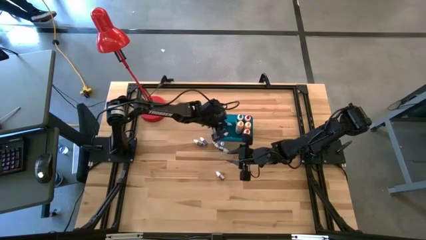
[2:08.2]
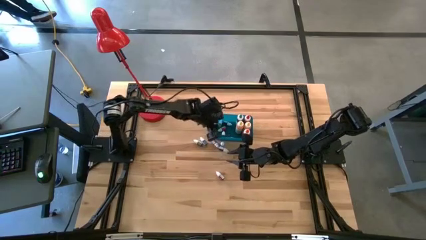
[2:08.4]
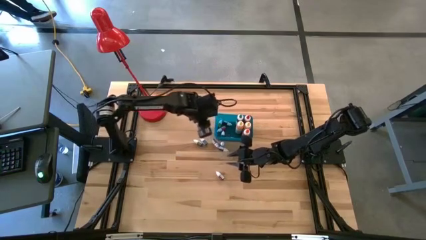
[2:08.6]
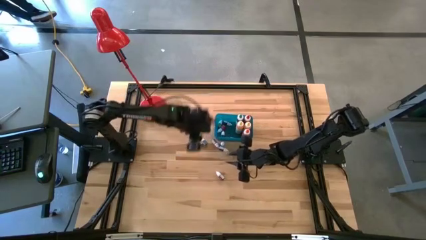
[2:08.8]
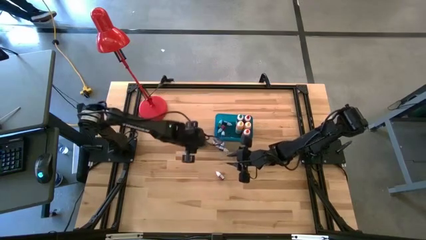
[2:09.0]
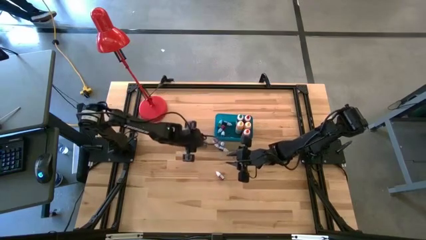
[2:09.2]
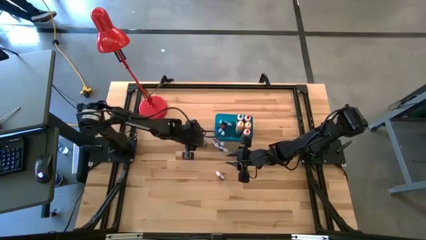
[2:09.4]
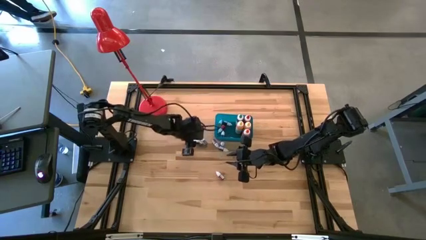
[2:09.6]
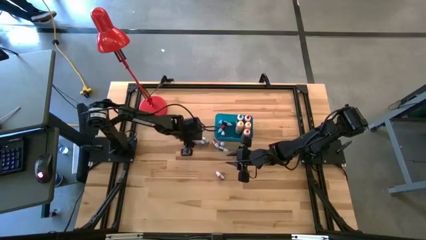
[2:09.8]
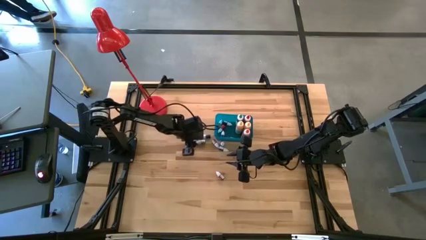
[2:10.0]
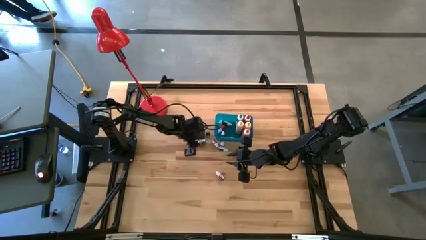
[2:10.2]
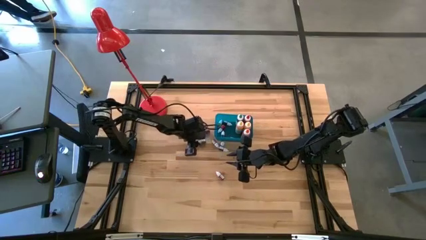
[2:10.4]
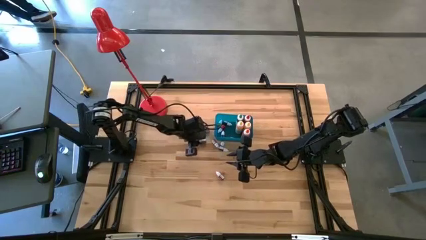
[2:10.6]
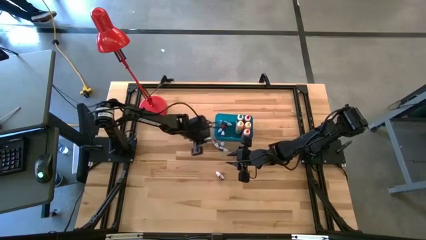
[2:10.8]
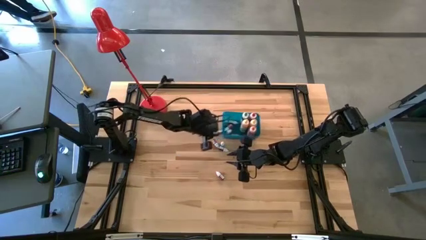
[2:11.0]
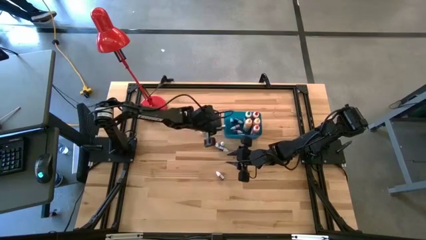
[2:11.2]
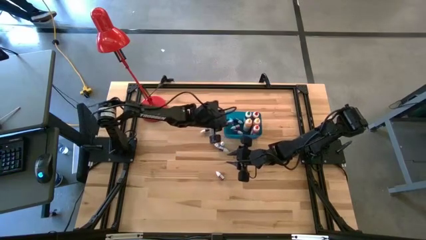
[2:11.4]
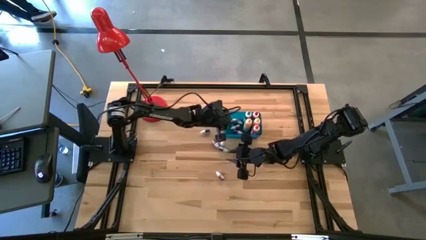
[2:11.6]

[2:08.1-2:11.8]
Task: Pick & Place food coloring
Put the small green food coloring bottle into the blue bin

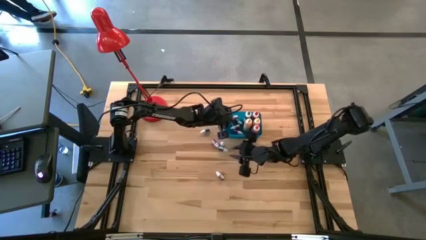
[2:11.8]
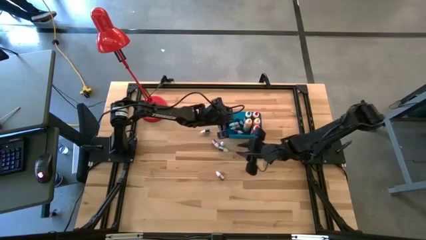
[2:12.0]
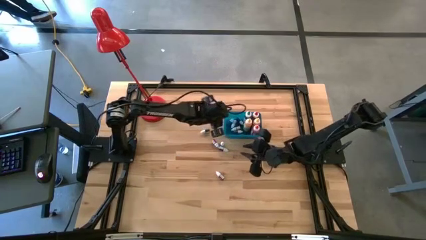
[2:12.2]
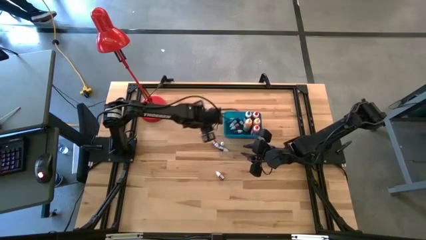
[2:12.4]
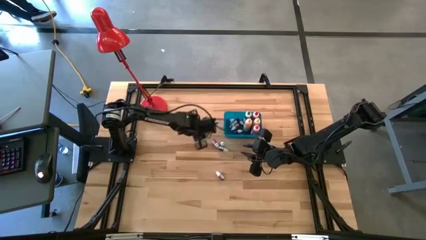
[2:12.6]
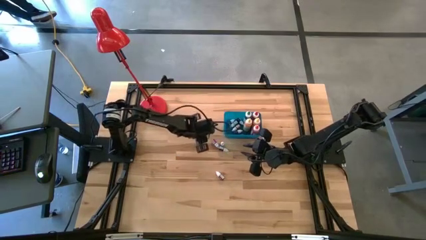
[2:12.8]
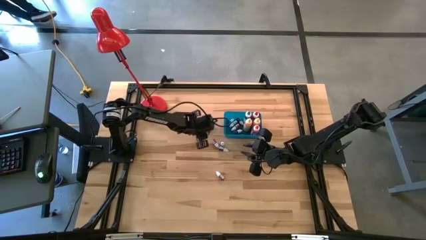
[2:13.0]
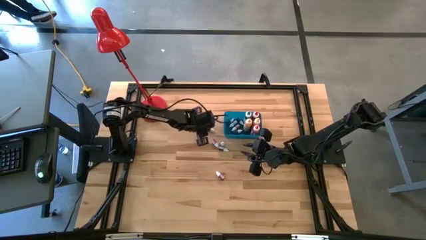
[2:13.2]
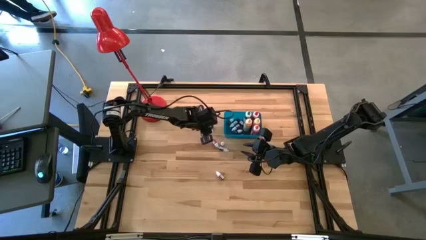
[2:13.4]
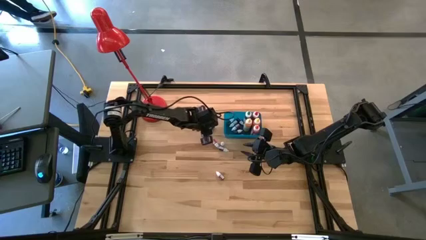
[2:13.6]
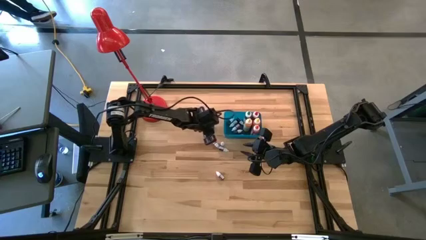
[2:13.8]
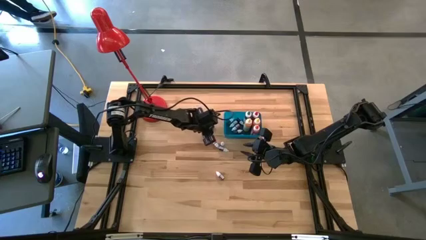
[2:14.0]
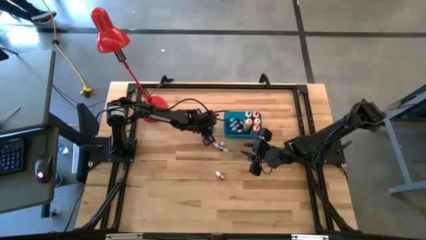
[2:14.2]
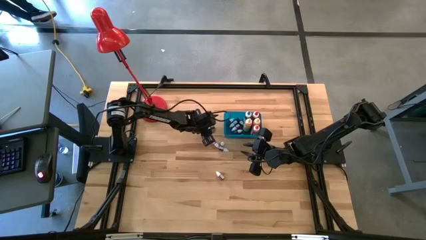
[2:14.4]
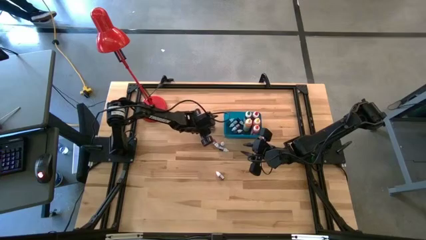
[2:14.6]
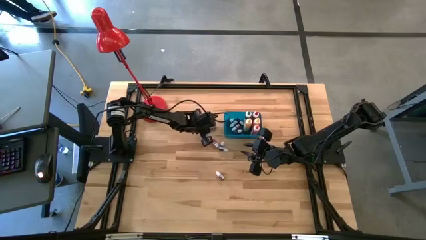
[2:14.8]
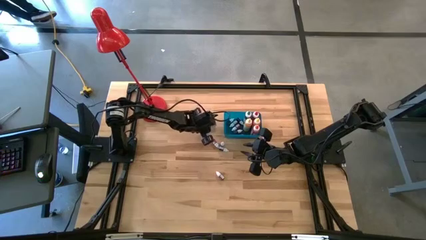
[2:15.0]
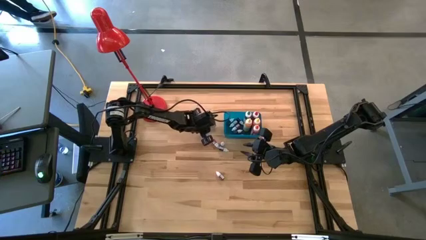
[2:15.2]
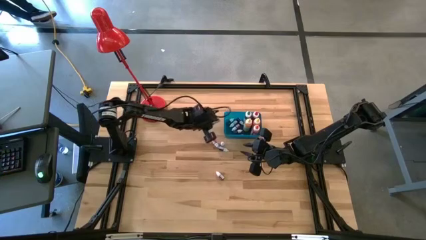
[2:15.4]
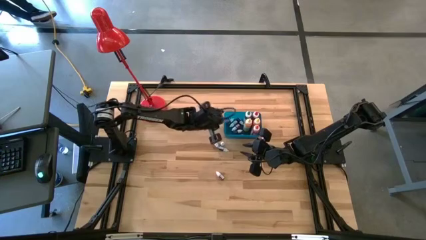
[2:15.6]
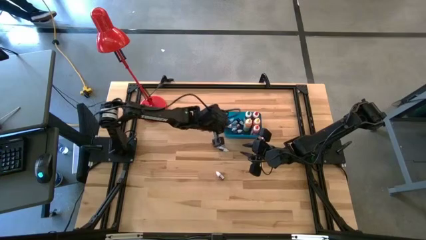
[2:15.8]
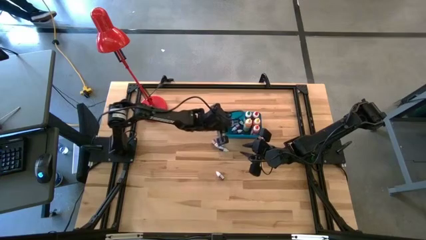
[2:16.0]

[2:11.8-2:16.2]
Put the top small white food coloring bottle into the blue bin

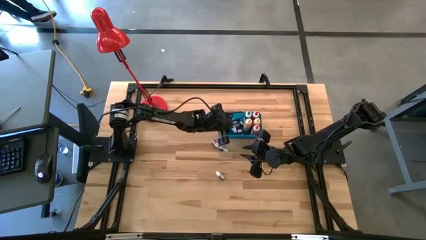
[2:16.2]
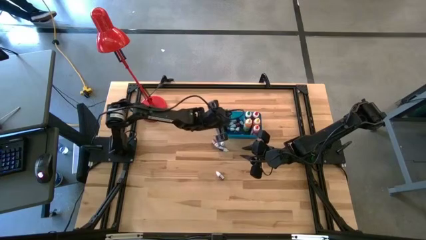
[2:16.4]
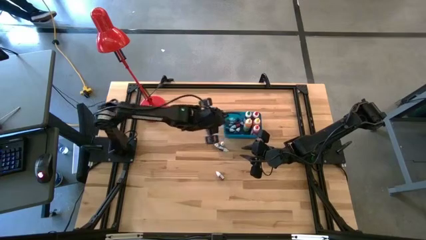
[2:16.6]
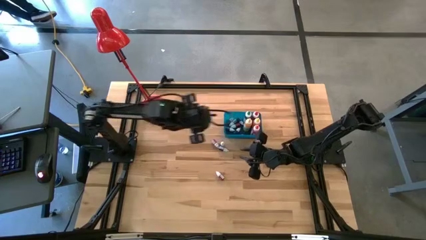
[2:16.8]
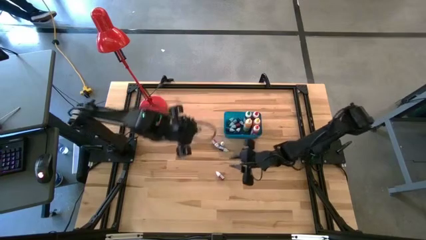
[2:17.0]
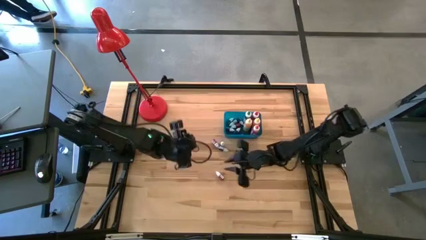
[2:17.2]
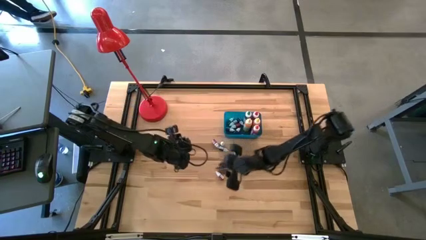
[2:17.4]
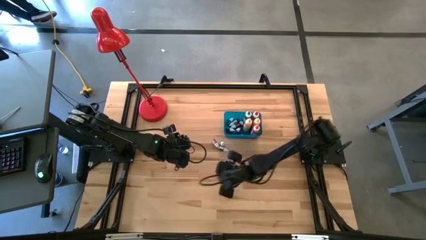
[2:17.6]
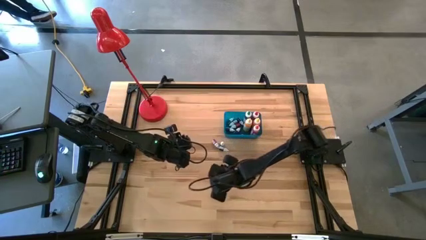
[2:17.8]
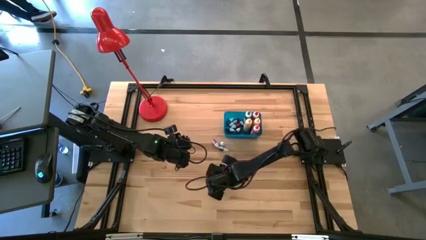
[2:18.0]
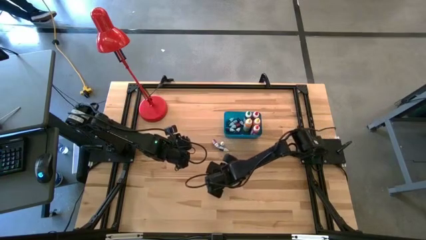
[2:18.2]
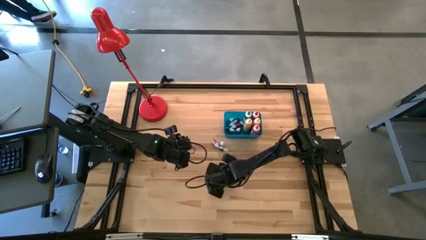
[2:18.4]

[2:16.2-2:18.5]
Put the small red food coloring bottle into the blue bin

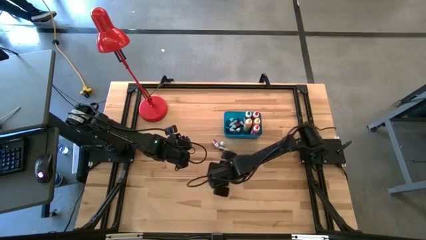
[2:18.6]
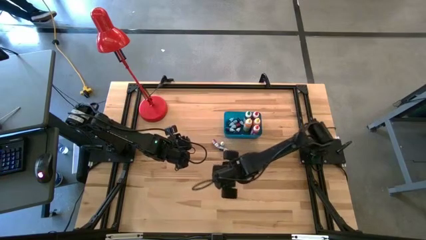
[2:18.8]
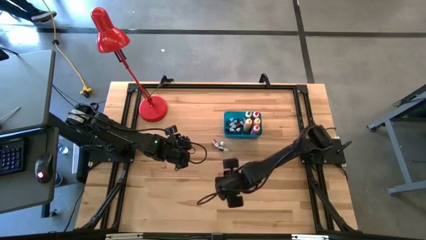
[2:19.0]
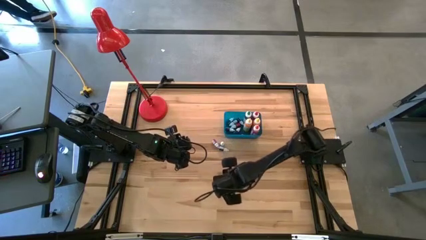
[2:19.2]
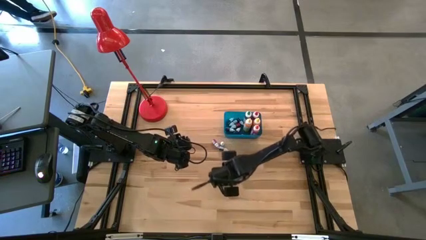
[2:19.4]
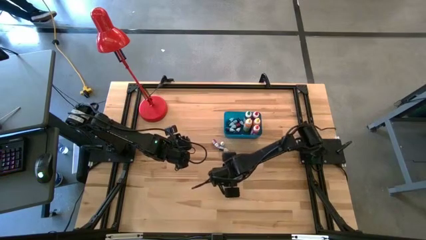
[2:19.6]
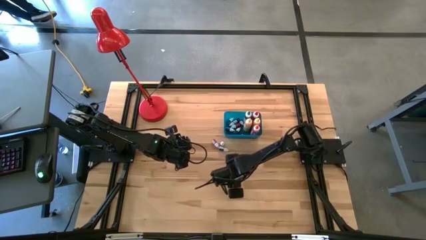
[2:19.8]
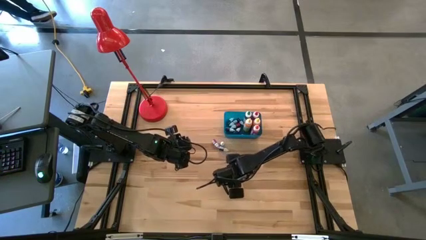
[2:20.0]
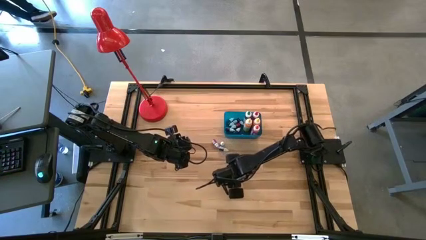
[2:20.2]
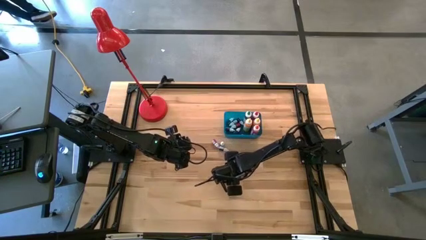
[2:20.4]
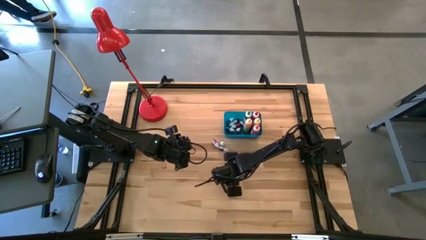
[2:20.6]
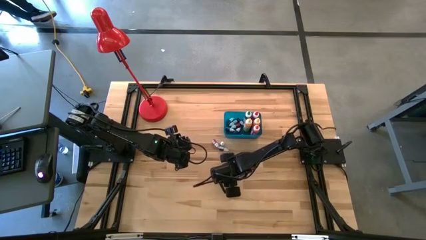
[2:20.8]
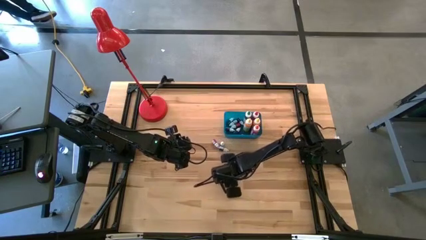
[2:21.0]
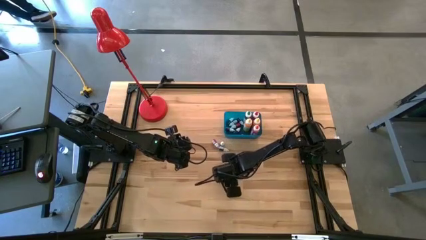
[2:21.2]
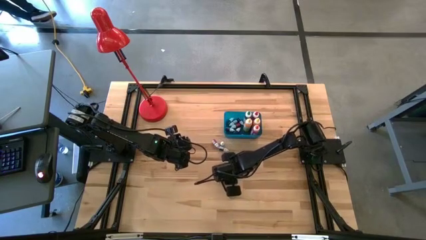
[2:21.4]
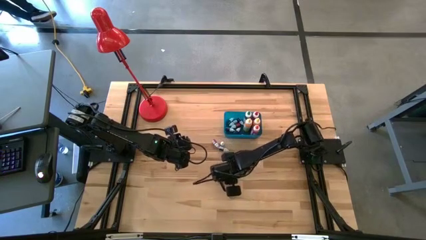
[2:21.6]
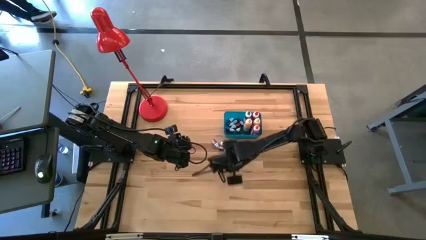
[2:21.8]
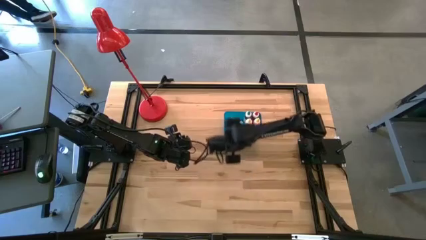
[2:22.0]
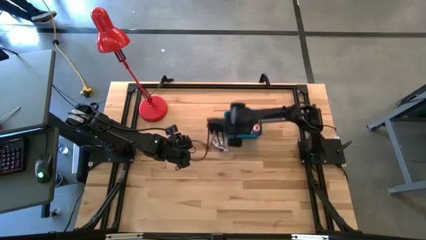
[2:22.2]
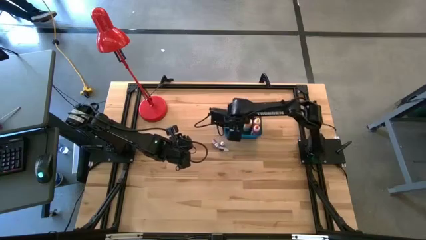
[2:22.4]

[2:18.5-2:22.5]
Put the bottom small red food coloring bottle into the blue bin

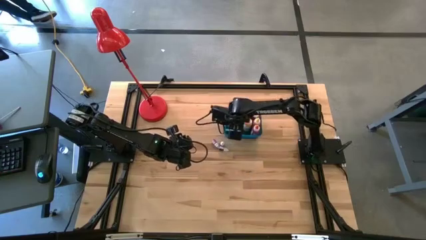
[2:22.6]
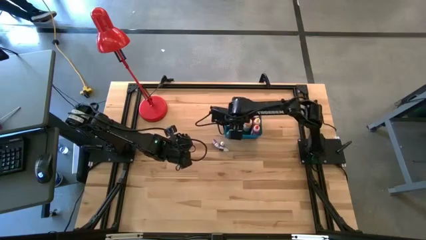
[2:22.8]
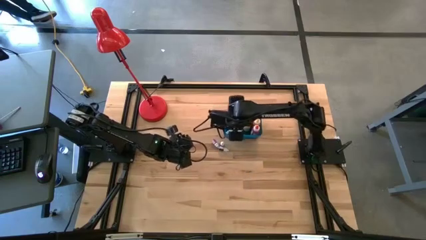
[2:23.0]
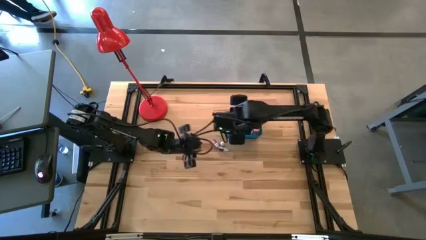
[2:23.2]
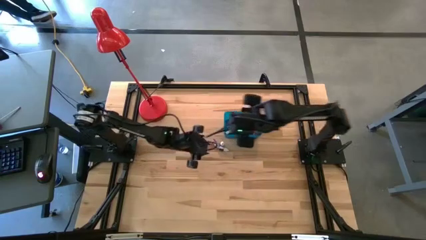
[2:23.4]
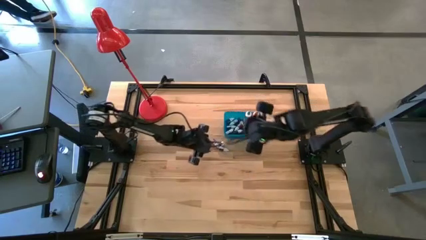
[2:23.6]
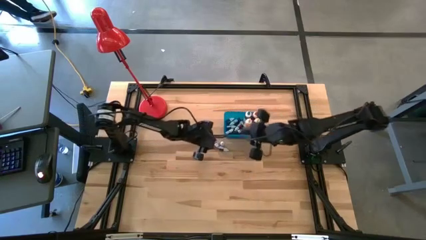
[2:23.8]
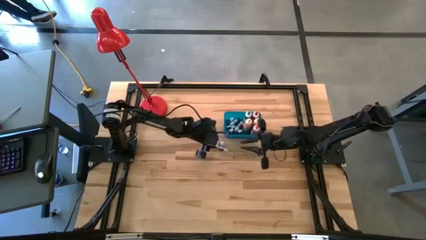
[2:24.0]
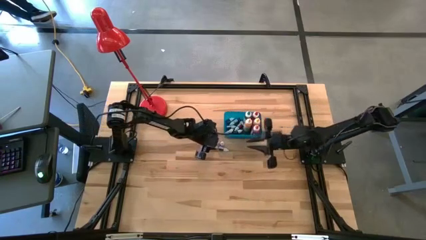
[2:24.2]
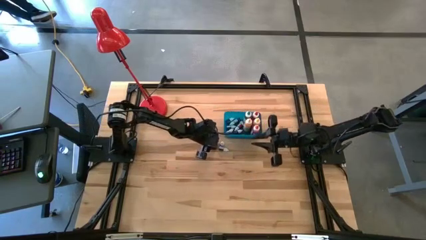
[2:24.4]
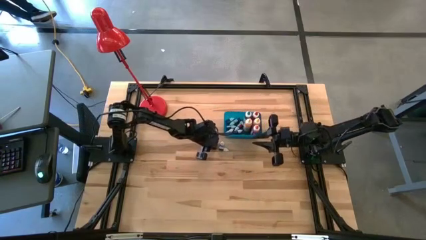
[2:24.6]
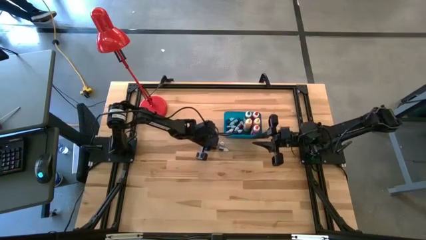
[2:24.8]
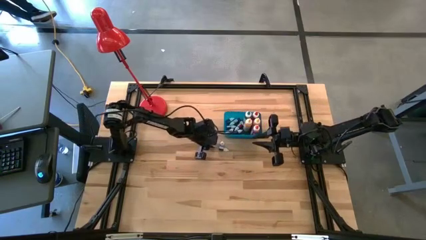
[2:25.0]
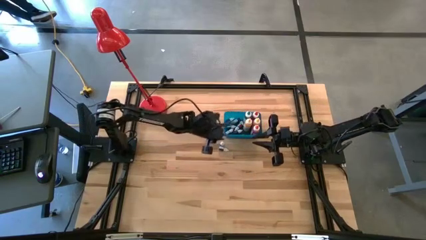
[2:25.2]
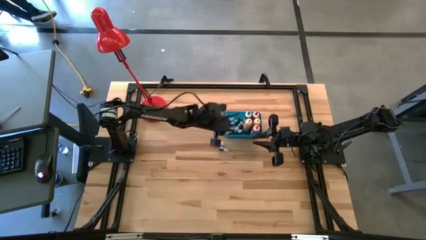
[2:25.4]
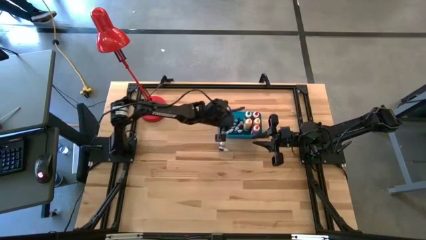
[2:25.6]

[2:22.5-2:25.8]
Put the small pink food coloring bottle into the blue bin
